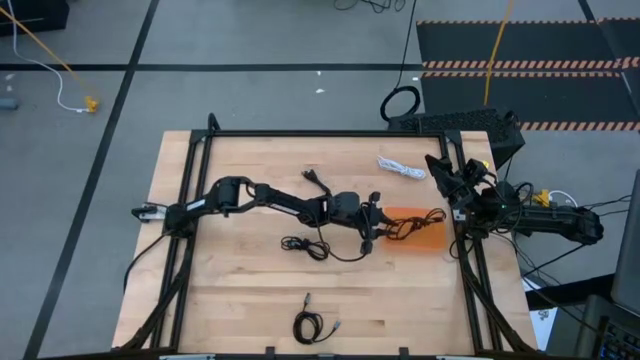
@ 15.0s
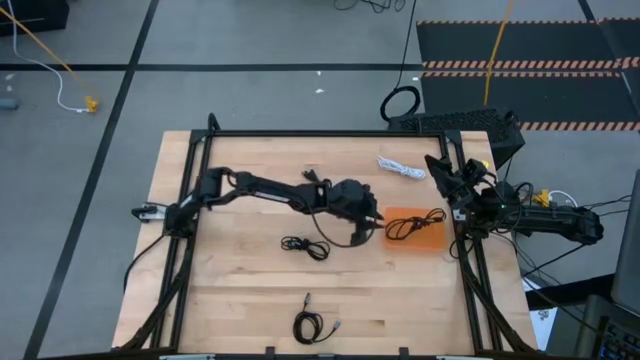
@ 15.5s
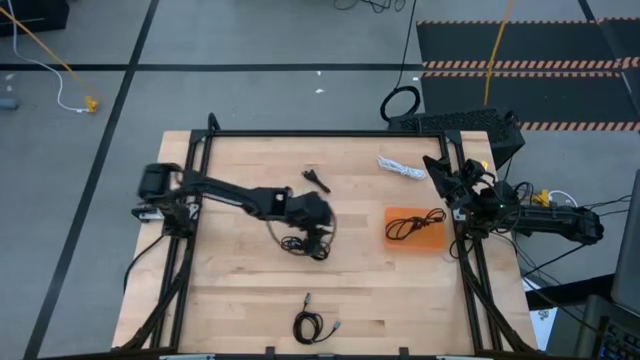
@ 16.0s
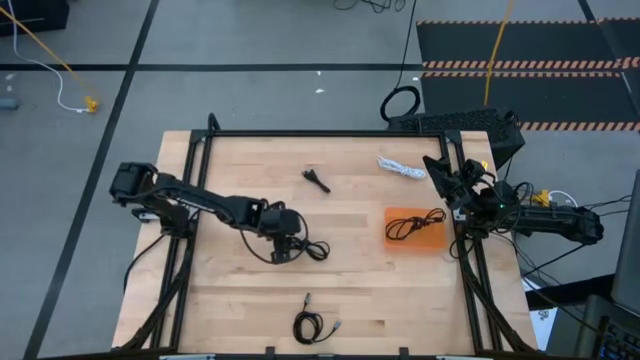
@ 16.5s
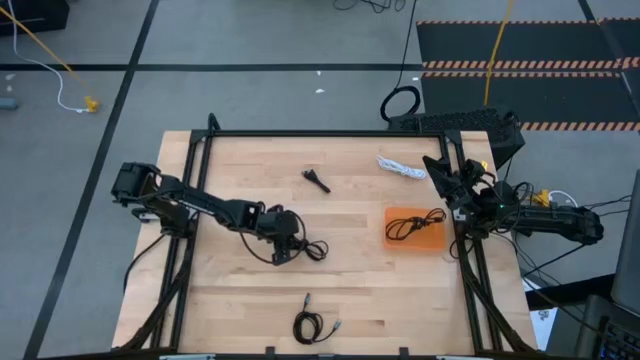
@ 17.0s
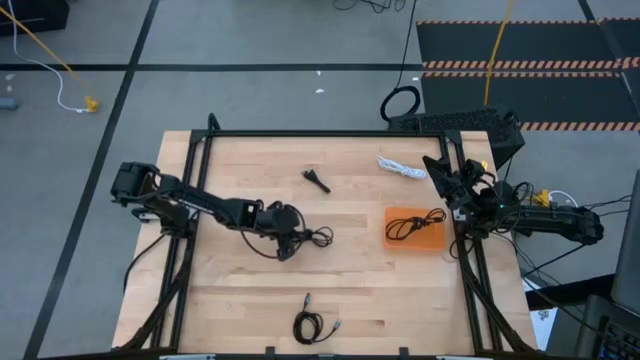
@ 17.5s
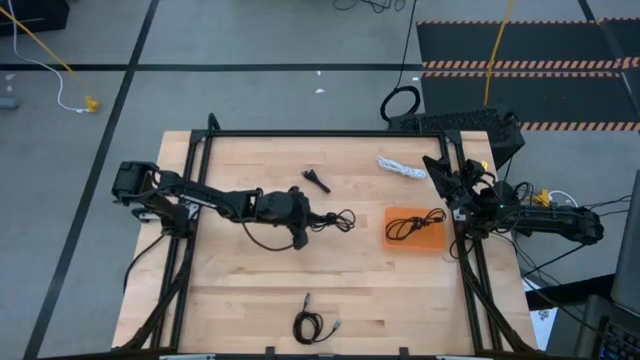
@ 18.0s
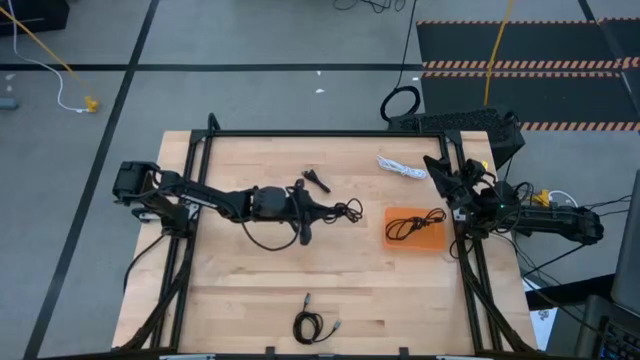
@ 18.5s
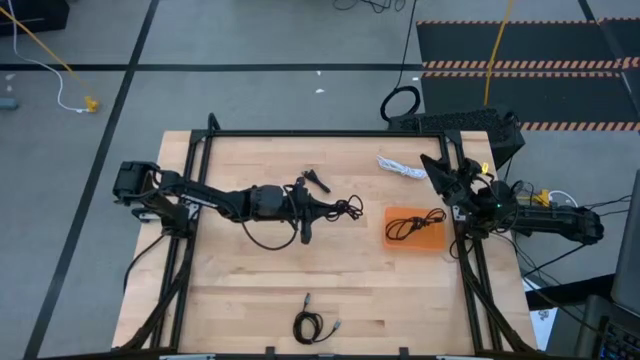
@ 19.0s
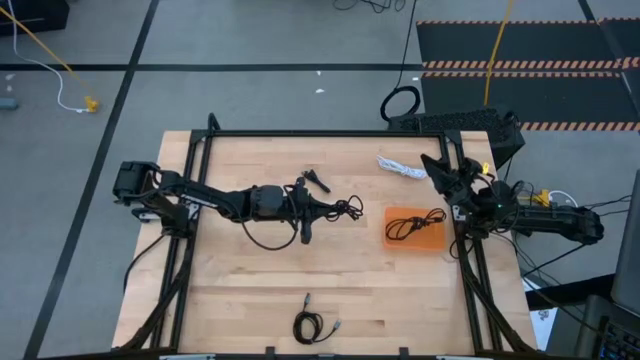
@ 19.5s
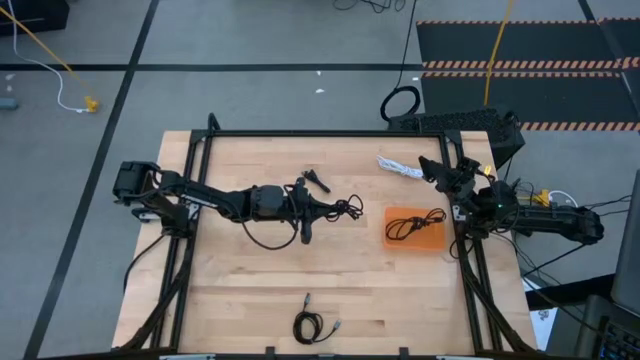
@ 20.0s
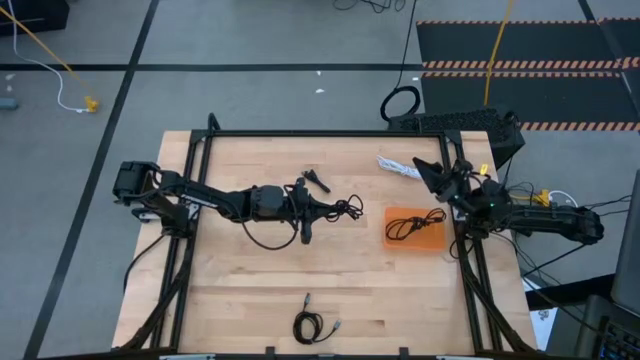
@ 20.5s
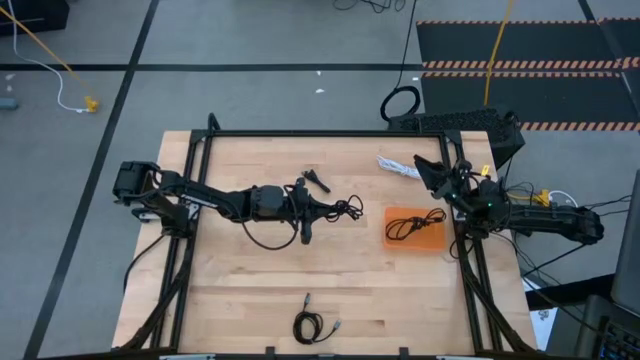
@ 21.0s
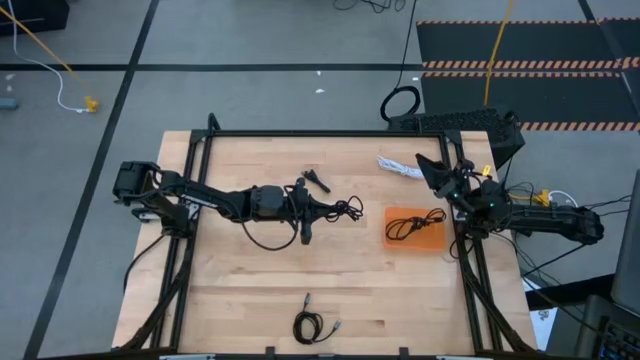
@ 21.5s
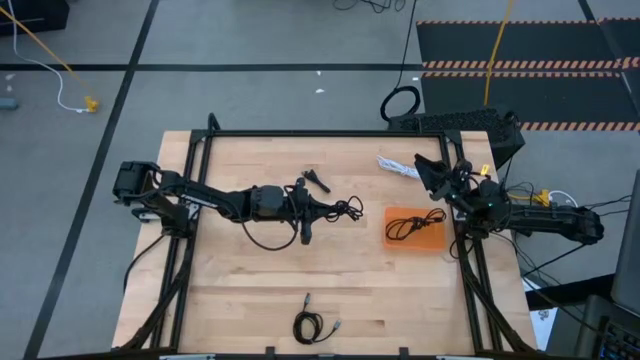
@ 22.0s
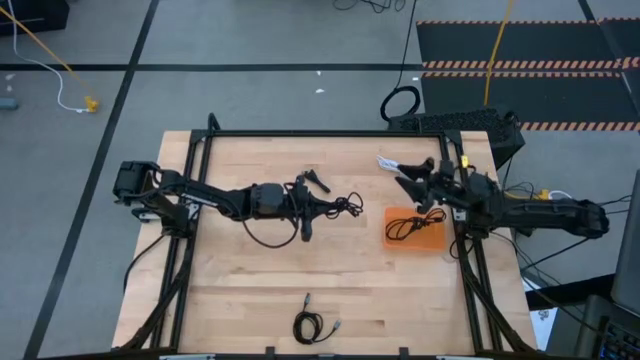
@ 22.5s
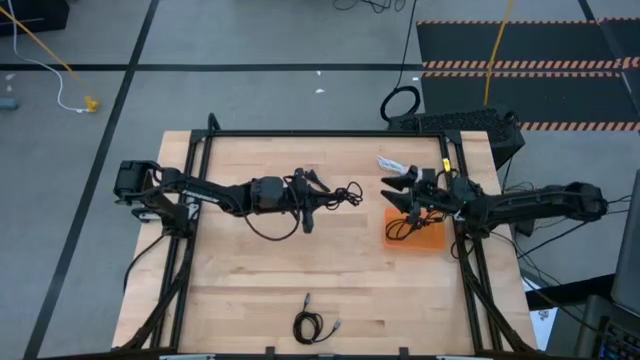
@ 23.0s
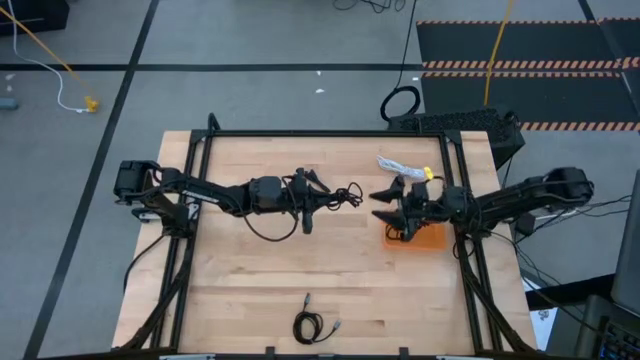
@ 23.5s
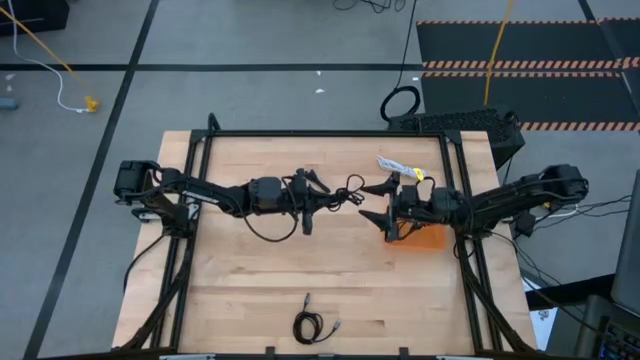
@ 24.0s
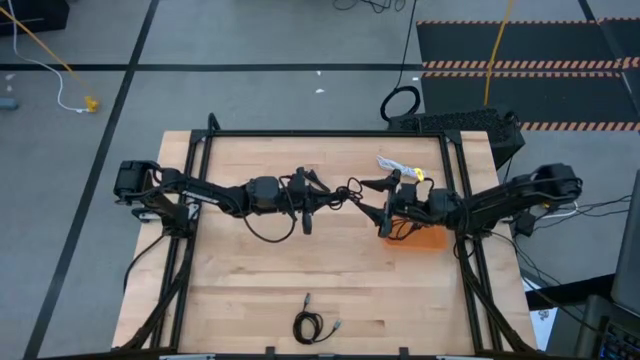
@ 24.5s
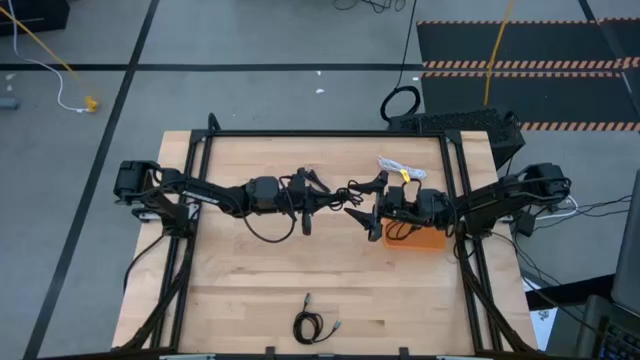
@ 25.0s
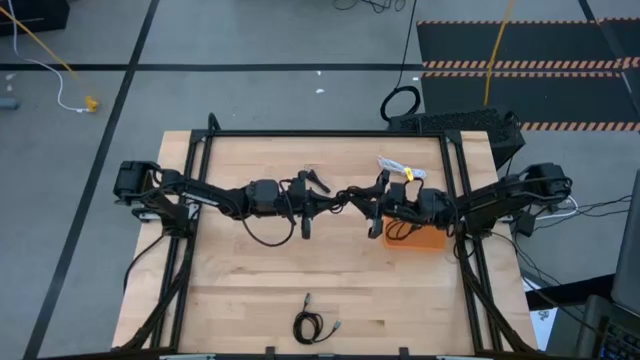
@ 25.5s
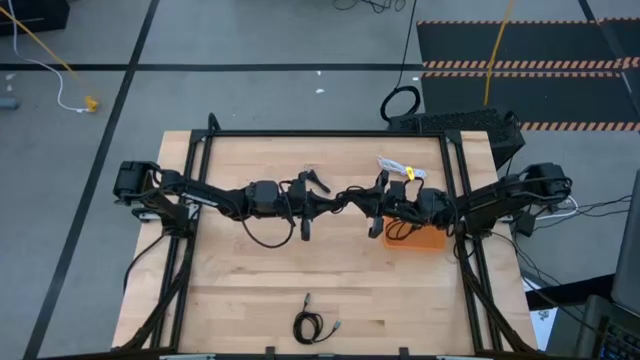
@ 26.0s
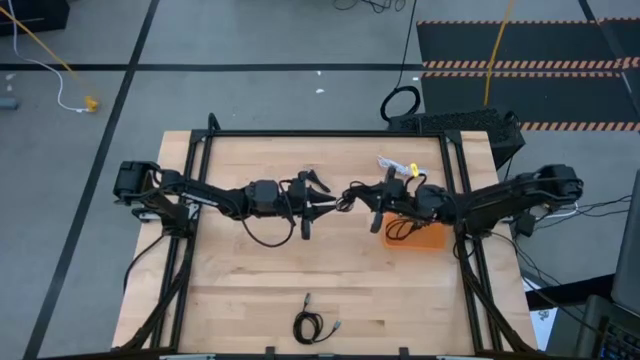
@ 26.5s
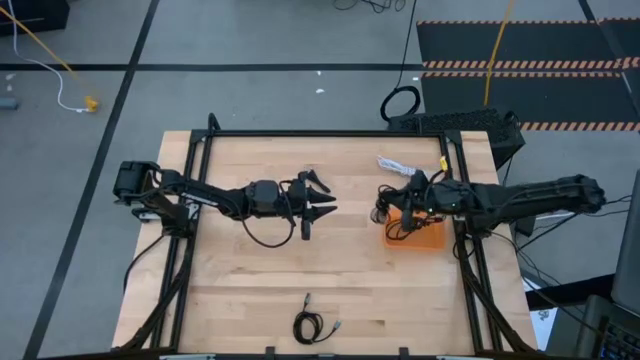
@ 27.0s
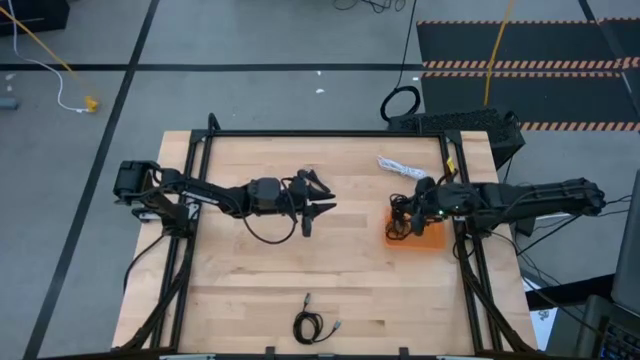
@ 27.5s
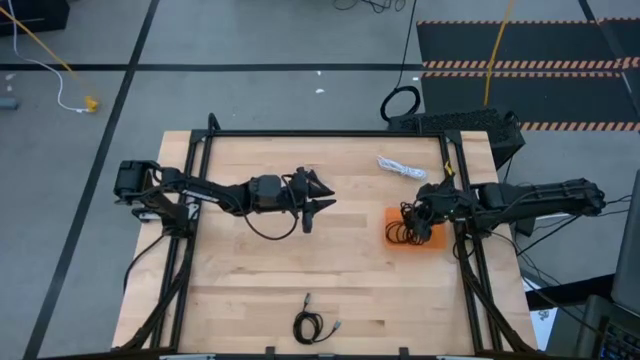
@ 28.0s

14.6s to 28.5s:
Task: Pick and place USB-C Cables
Put the middle black charger cable into the orange bin
